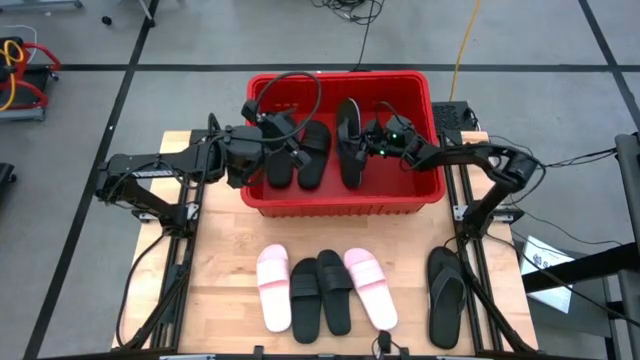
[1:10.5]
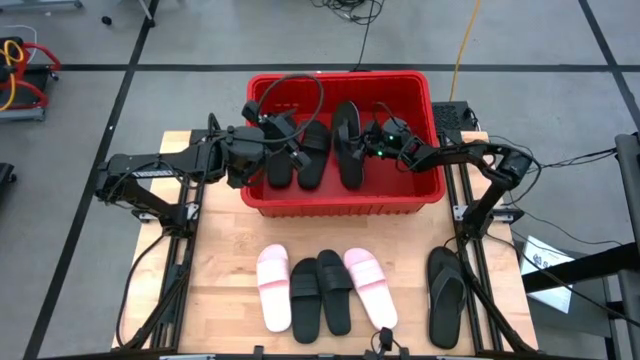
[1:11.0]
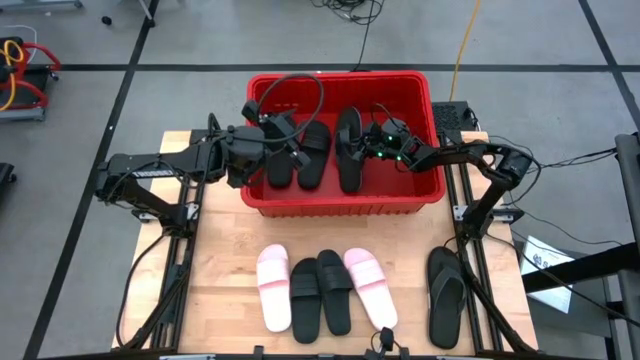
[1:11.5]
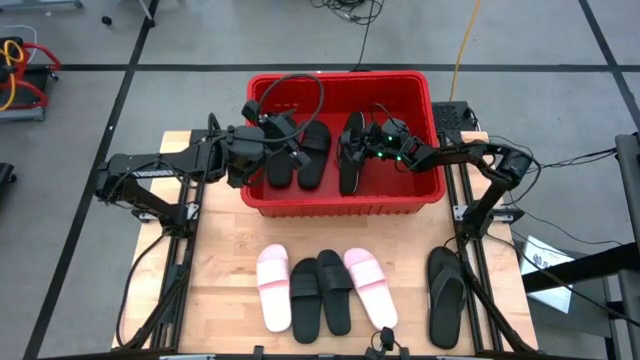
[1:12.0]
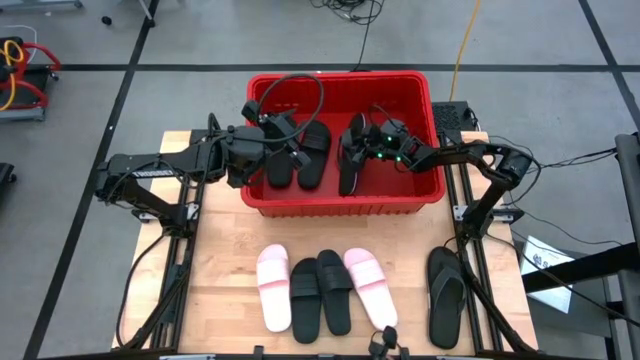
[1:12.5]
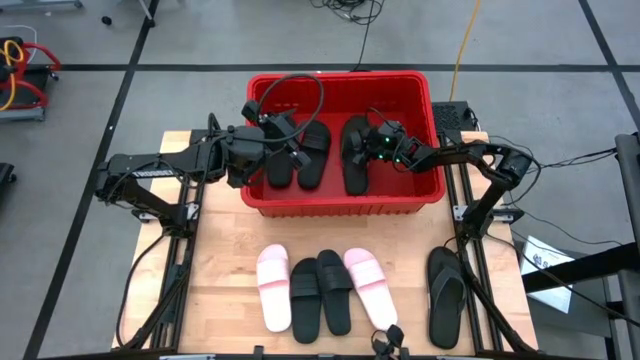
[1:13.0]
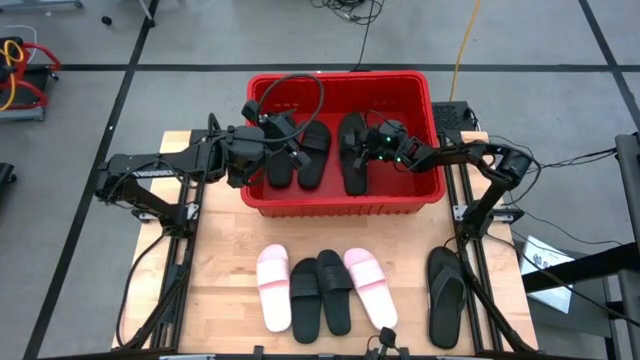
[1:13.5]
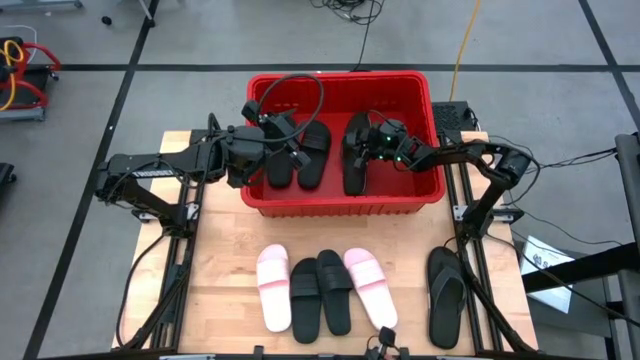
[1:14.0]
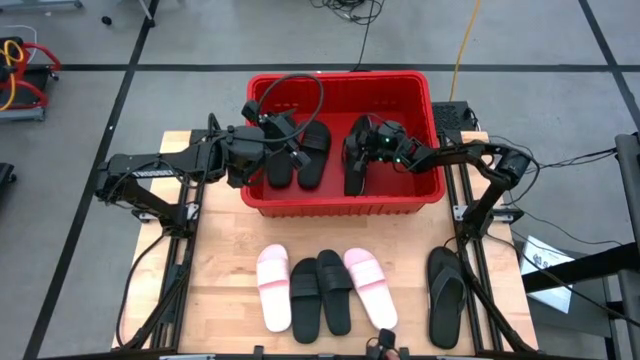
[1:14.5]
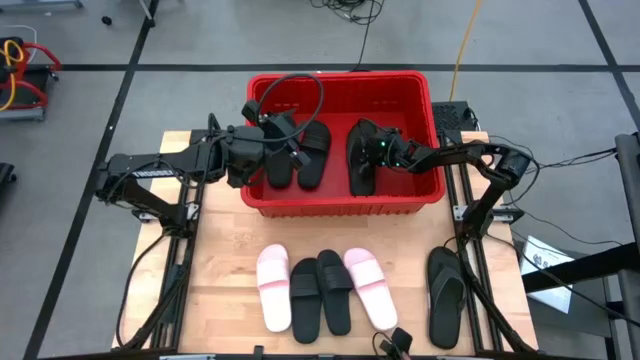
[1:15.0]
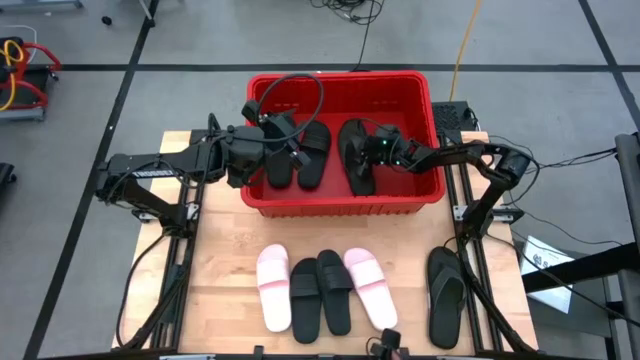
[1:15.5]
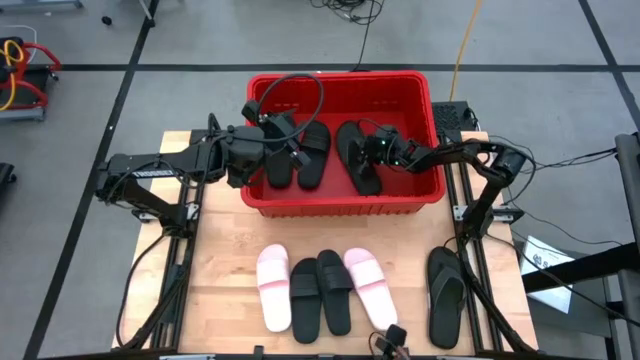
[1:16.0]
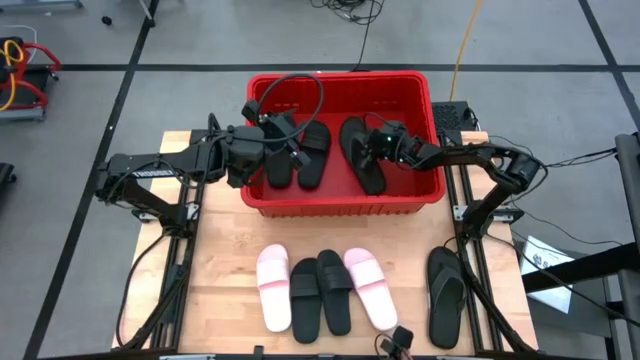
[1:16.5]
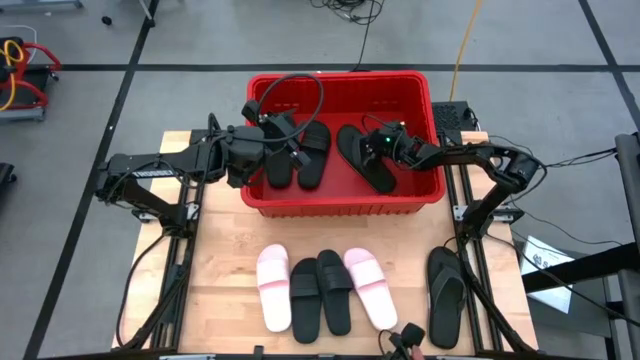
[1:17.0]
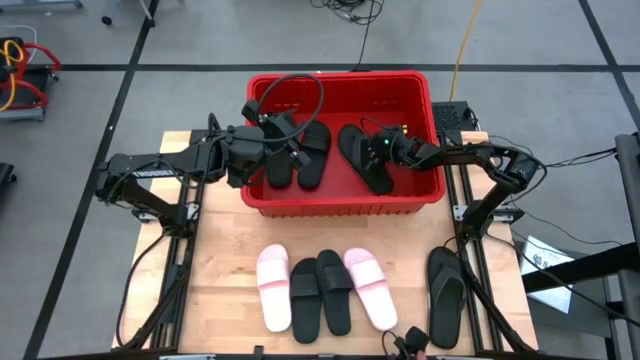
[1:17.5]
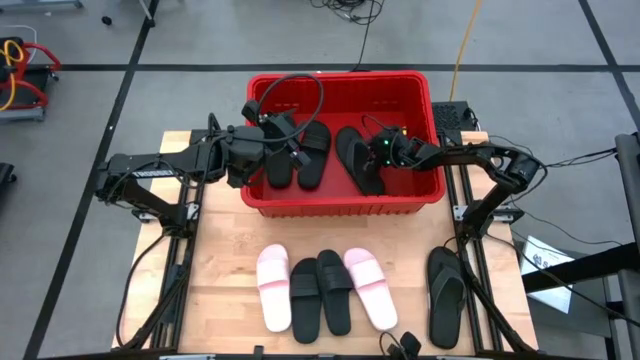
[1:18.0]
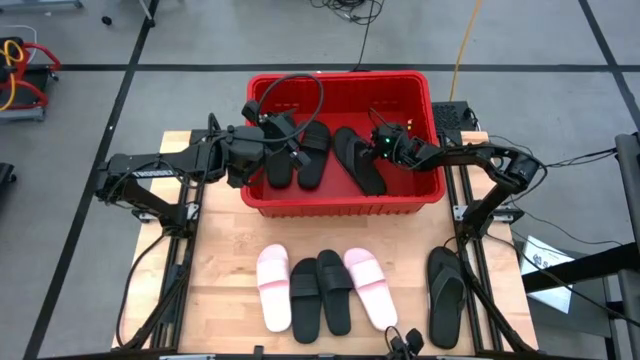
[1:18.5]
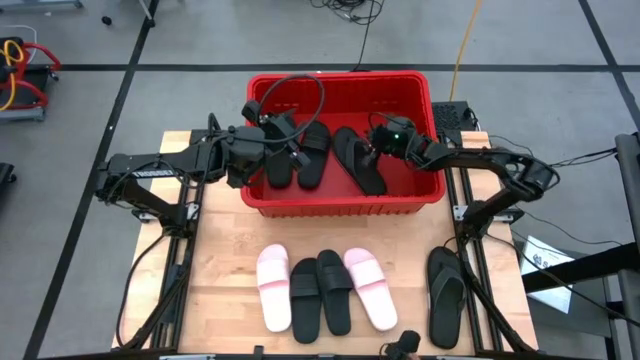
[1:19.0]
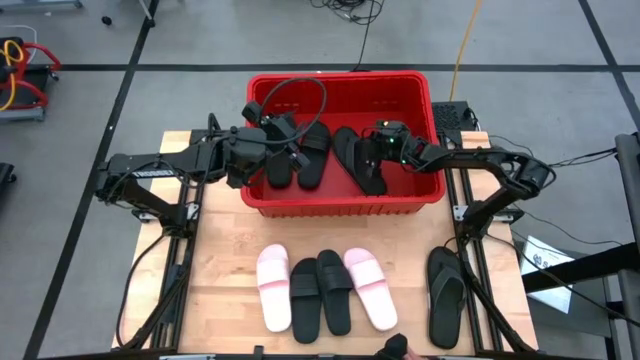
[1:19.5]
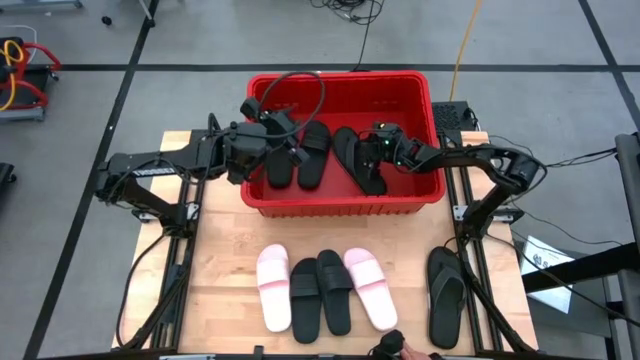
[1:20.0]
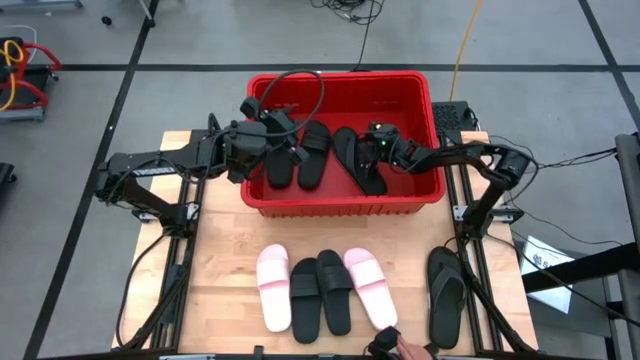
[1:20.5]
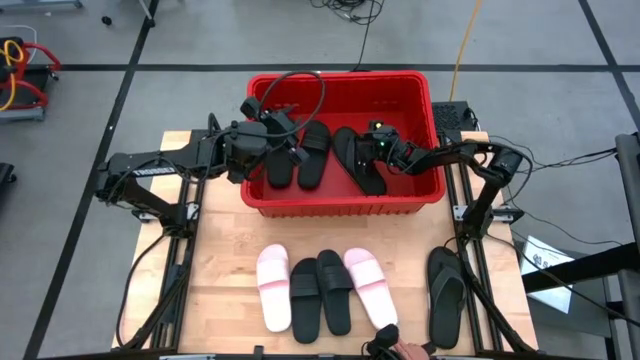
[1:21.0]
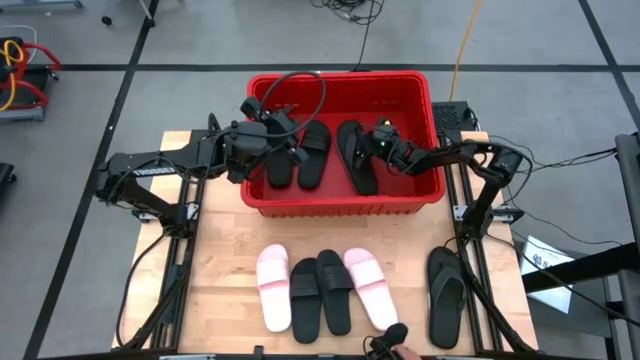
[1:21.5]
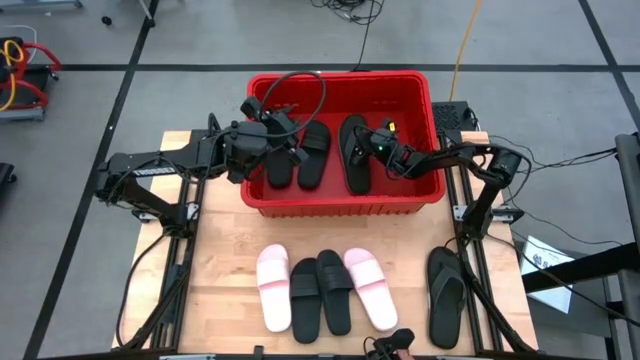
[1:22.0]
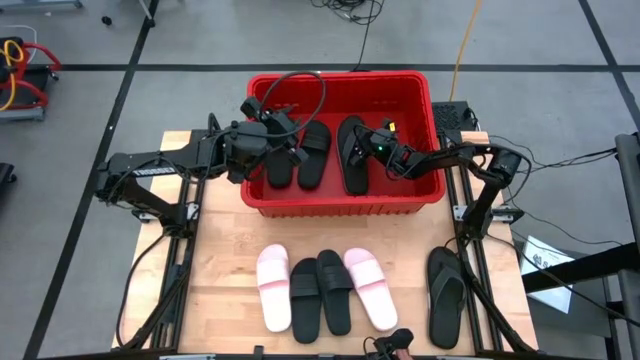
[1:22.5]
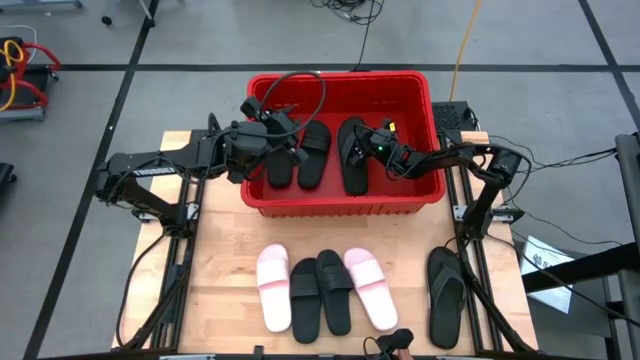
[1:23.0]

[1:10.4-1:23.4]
Task: Pick and place slides into bin
Put the black slipper into the red container

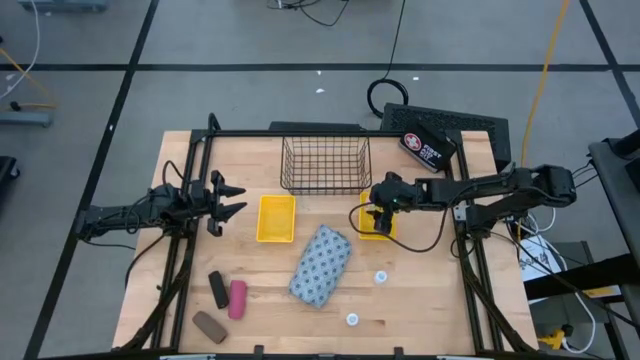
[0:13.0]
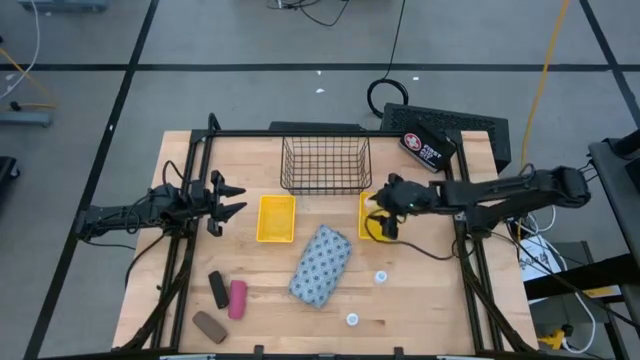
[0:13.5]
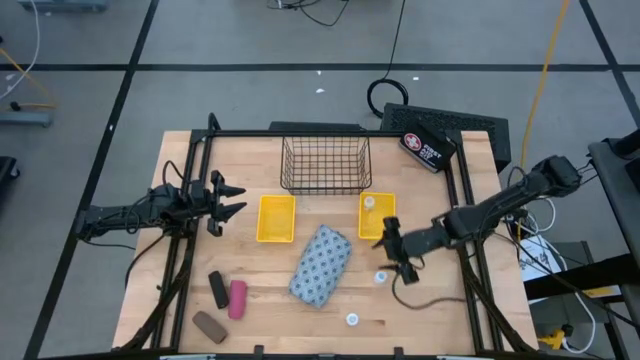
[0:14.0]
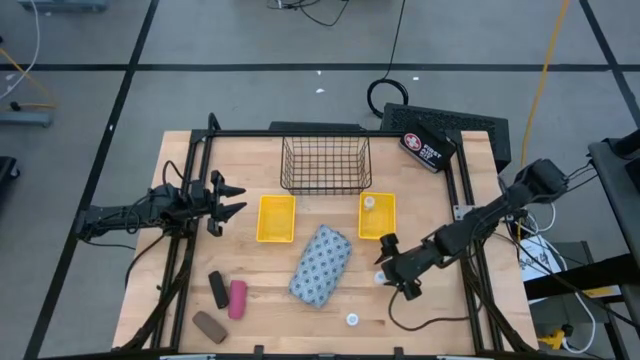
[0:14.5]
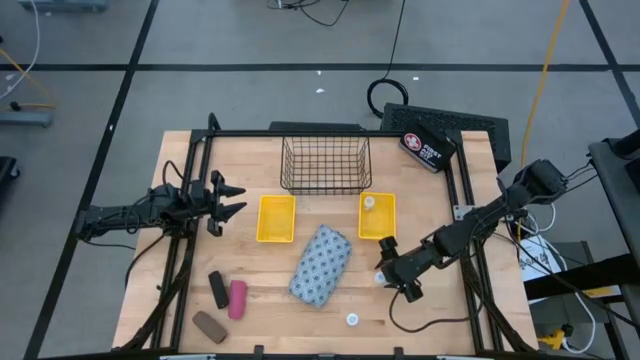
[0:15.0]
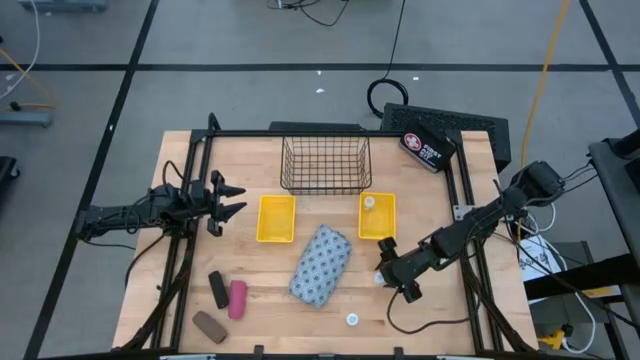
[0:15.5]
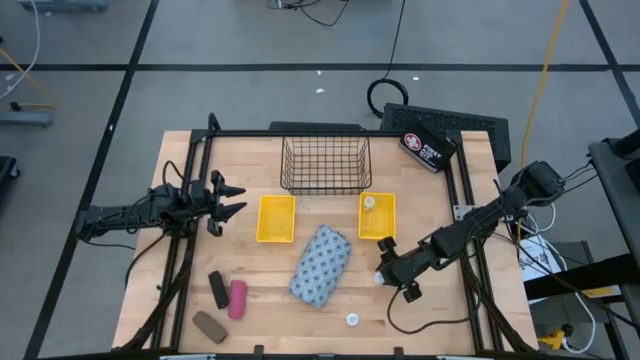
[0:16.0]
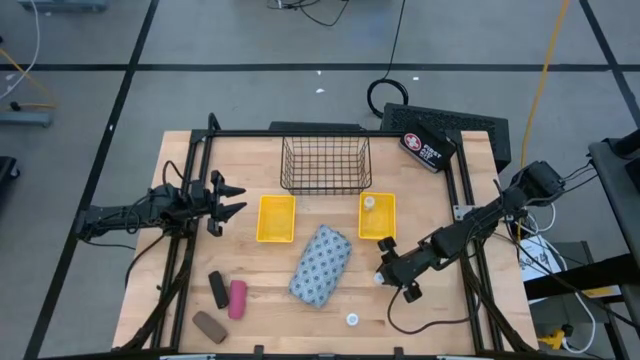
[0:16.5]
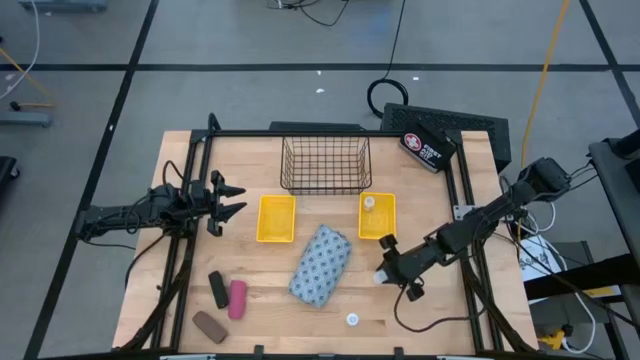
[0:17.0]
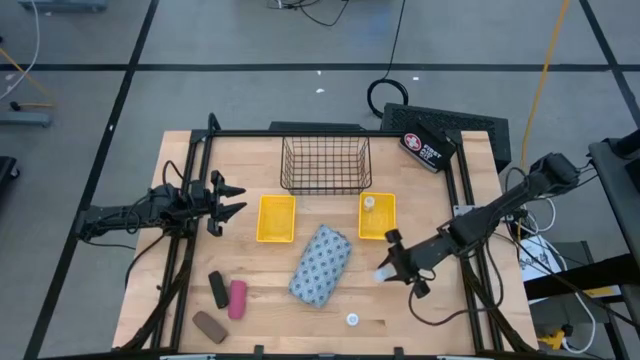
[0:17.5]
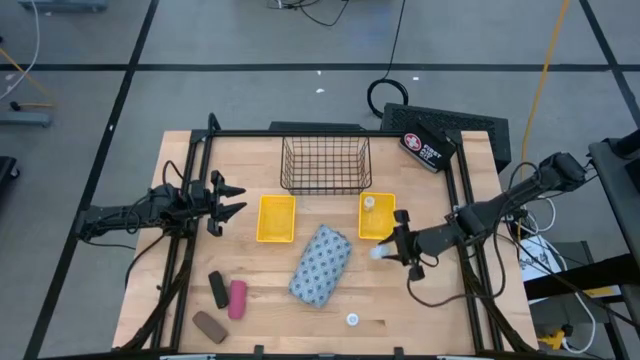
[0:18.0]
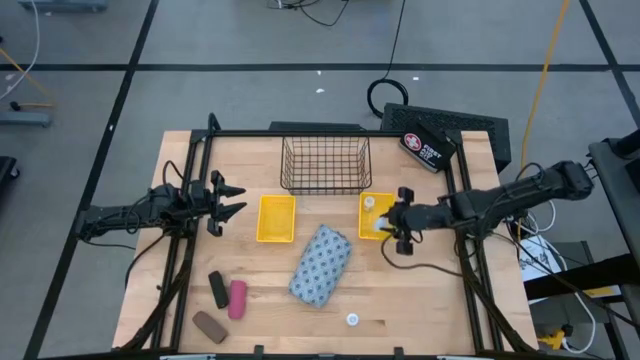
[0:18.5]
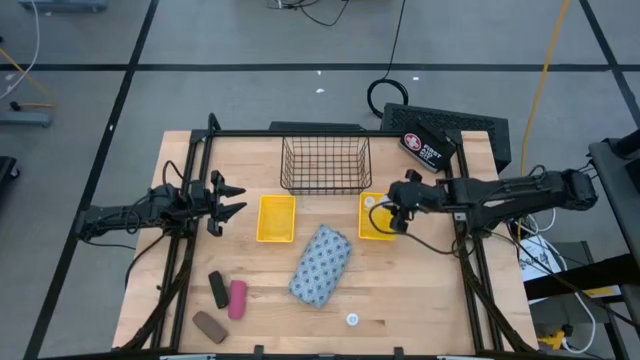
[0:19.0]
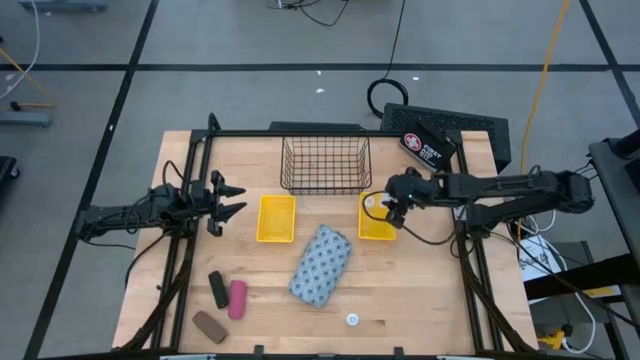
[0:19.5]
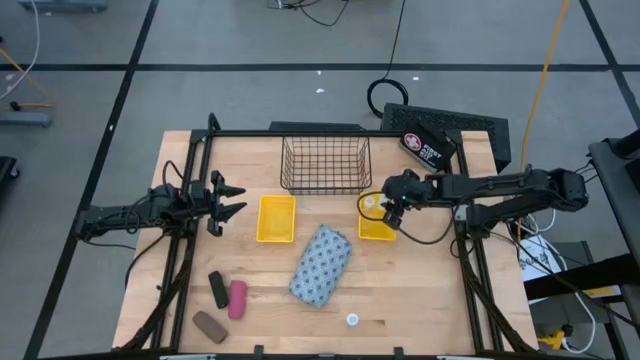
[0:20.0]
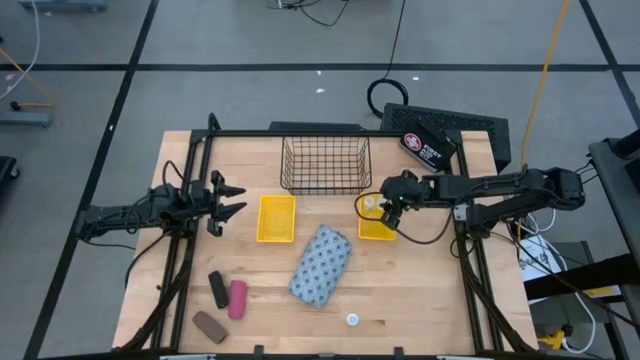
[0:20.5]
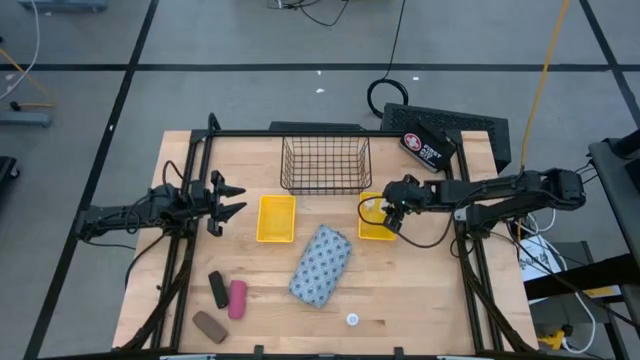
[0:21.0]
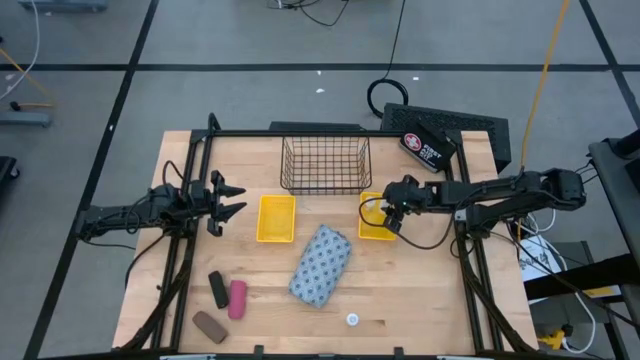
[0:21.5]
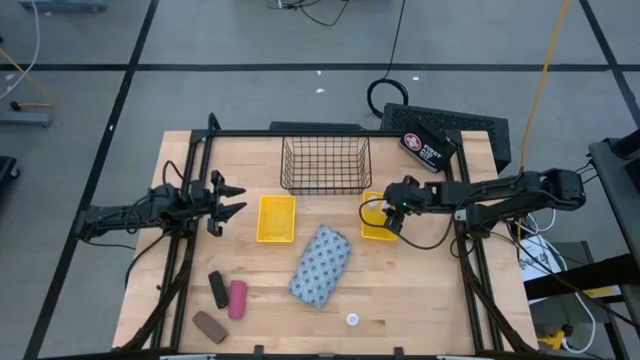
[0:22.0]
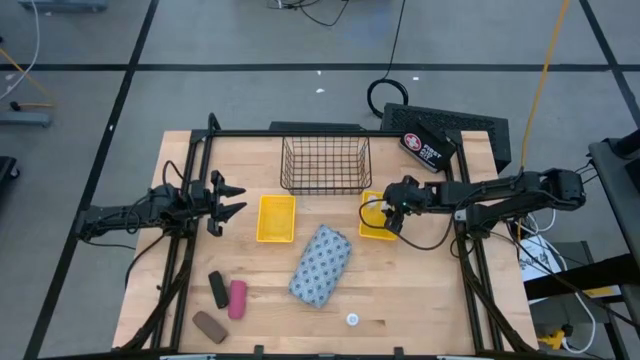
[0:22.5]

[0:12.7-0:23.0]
Task: Pick & Place Medicine items
Put the top transparent pill bottle into the right yellow basket
